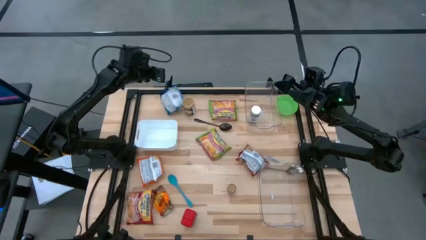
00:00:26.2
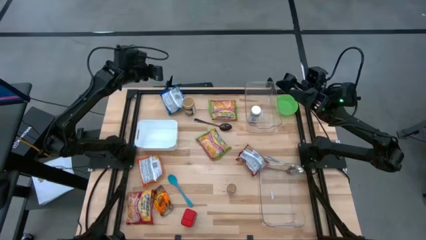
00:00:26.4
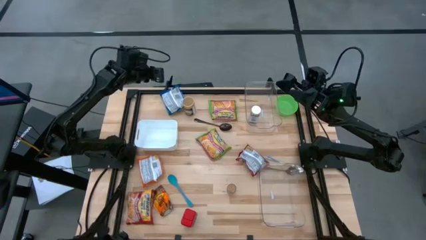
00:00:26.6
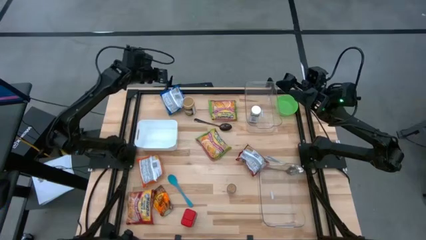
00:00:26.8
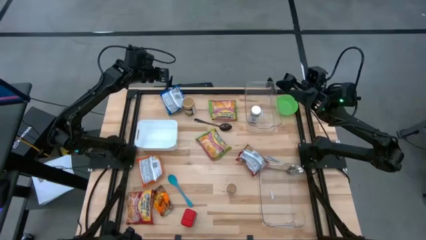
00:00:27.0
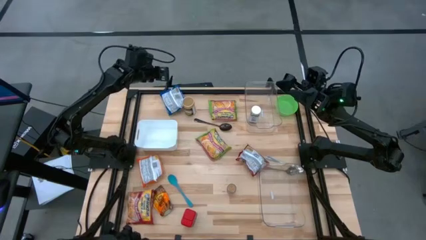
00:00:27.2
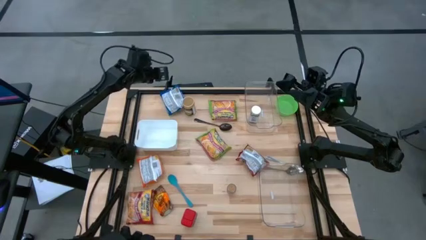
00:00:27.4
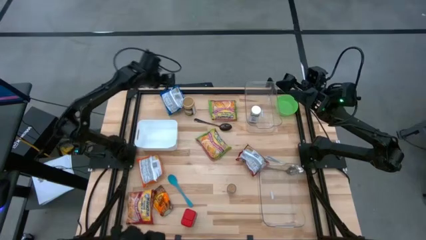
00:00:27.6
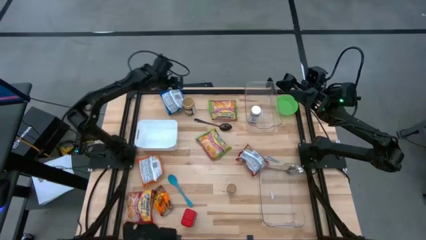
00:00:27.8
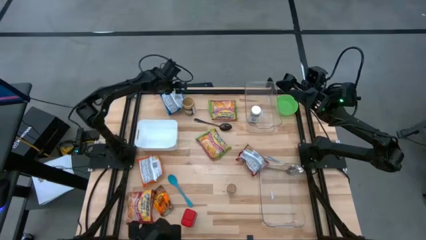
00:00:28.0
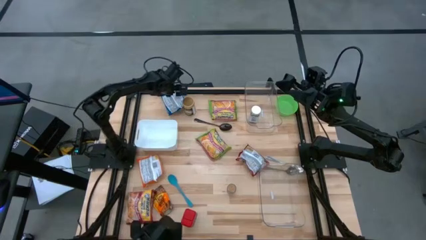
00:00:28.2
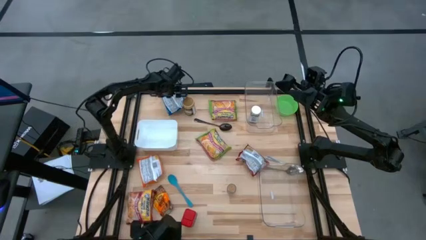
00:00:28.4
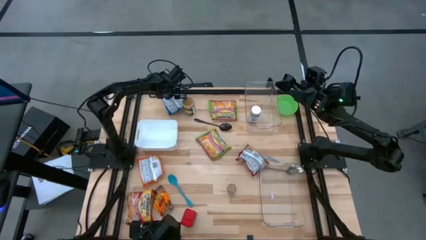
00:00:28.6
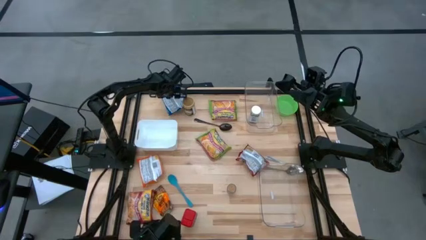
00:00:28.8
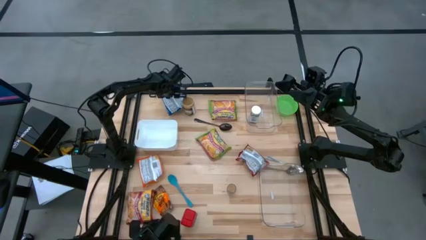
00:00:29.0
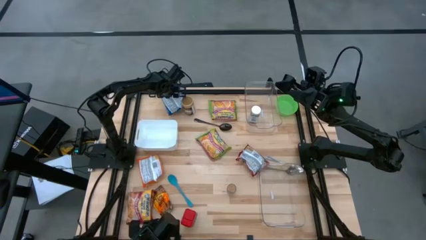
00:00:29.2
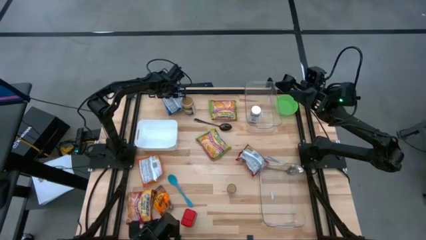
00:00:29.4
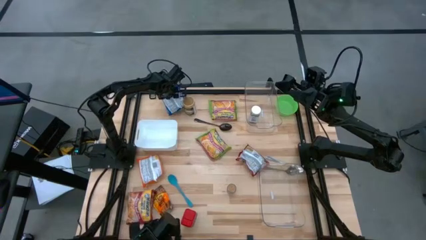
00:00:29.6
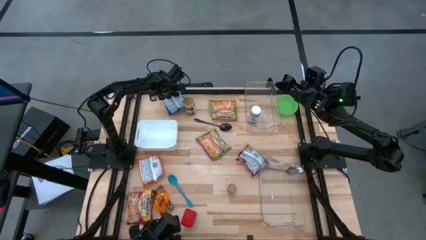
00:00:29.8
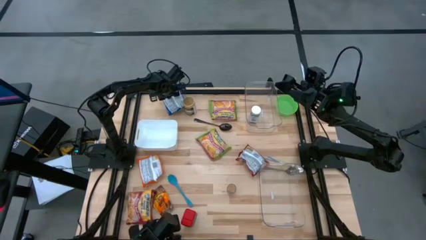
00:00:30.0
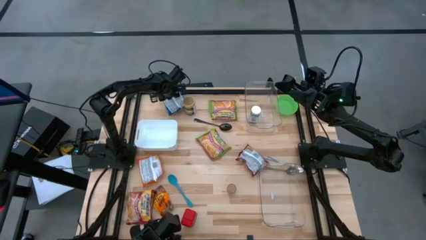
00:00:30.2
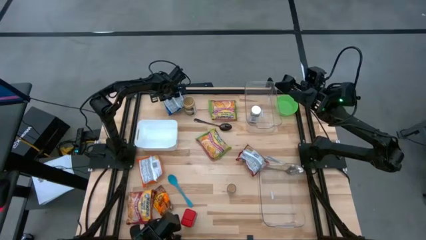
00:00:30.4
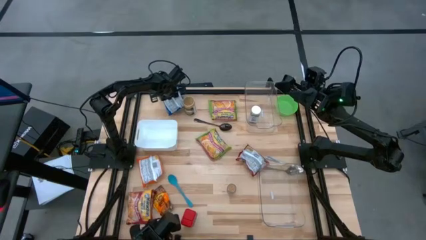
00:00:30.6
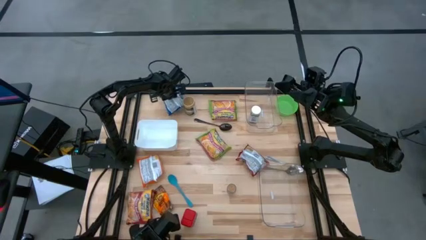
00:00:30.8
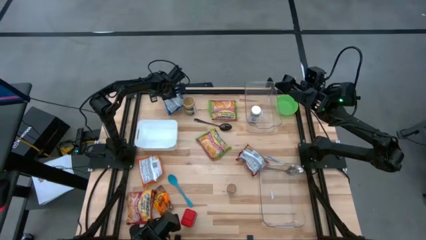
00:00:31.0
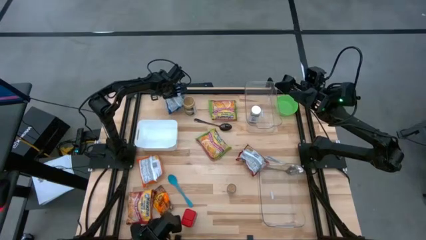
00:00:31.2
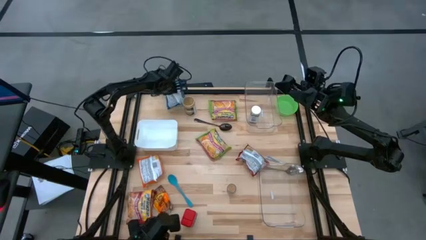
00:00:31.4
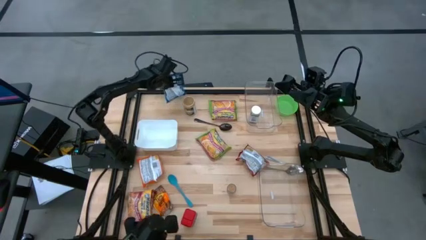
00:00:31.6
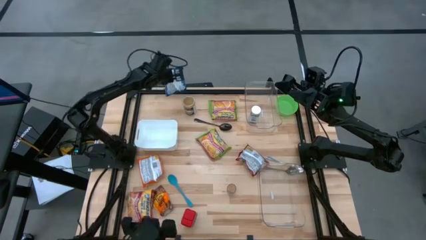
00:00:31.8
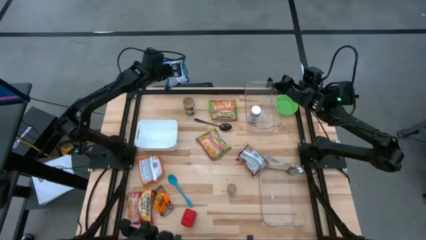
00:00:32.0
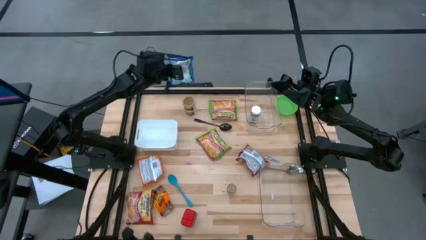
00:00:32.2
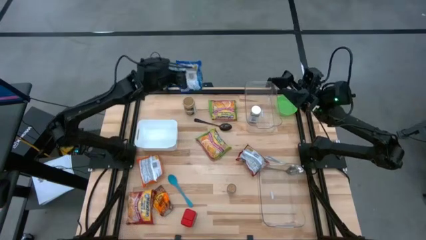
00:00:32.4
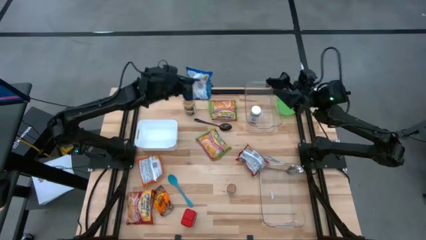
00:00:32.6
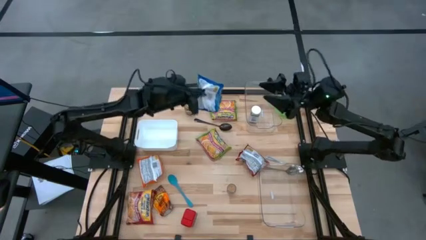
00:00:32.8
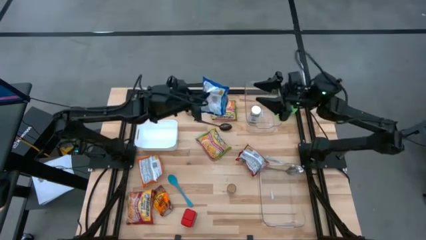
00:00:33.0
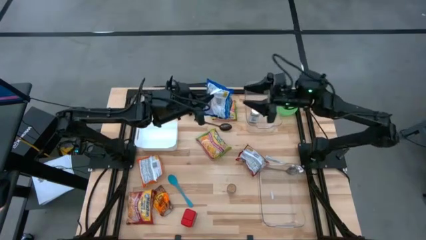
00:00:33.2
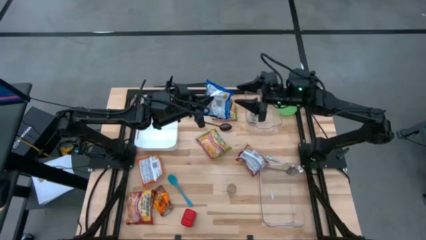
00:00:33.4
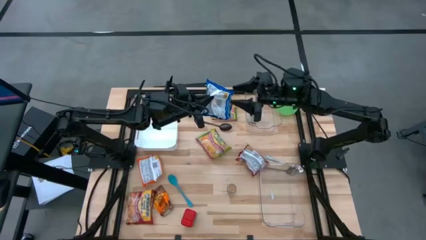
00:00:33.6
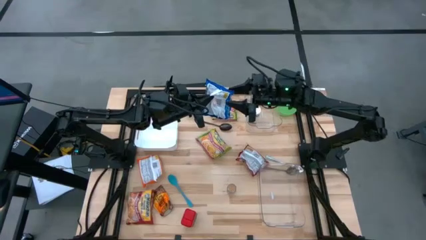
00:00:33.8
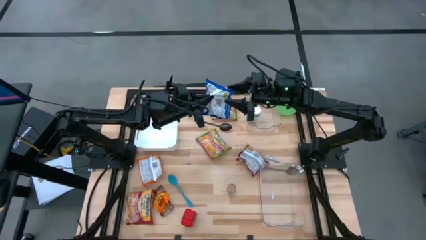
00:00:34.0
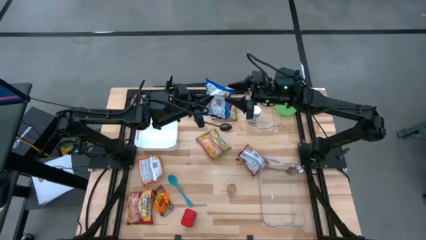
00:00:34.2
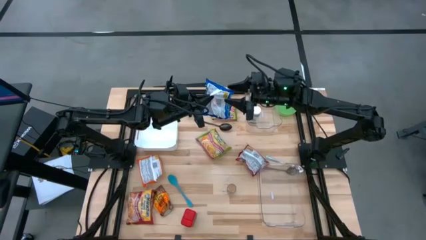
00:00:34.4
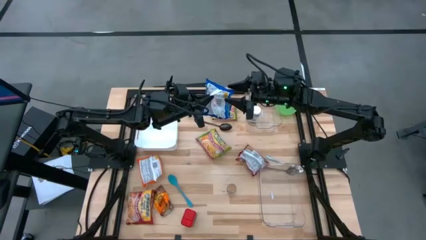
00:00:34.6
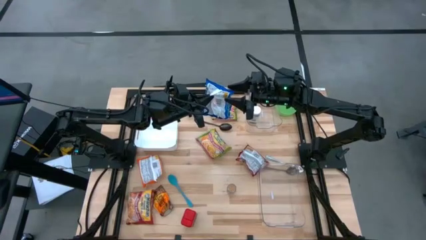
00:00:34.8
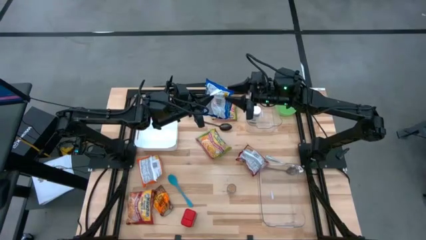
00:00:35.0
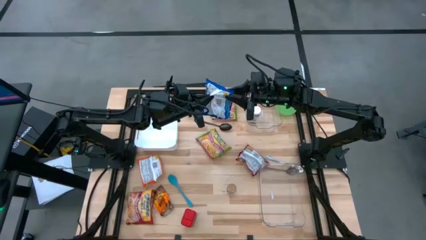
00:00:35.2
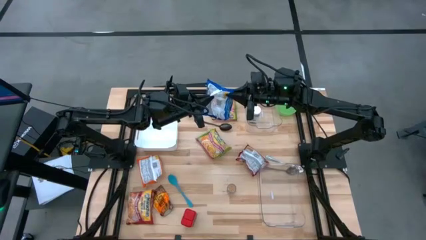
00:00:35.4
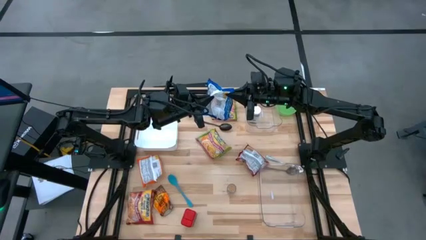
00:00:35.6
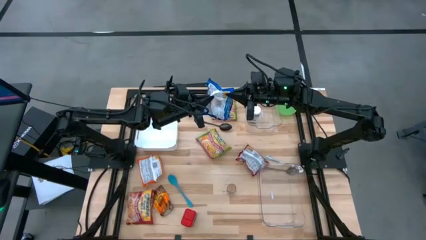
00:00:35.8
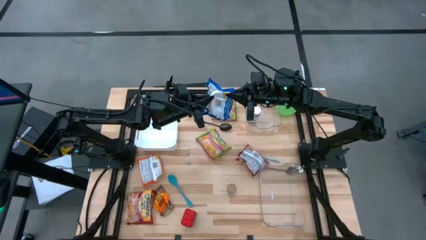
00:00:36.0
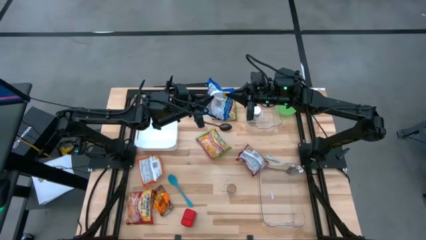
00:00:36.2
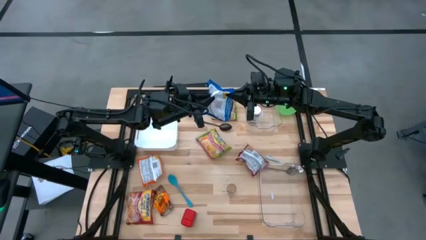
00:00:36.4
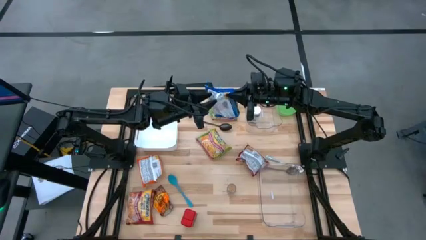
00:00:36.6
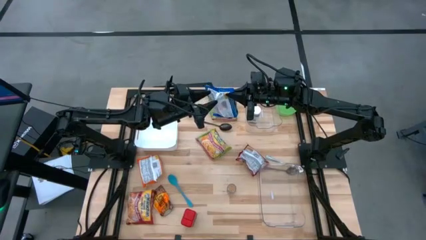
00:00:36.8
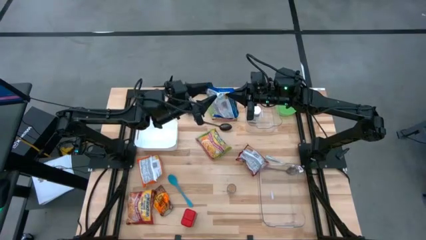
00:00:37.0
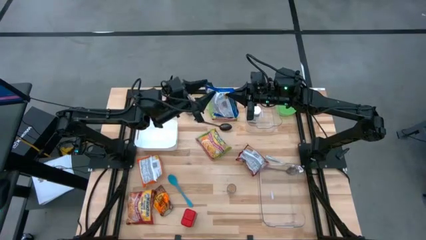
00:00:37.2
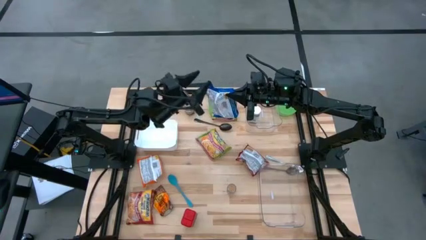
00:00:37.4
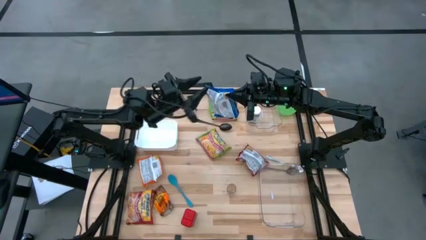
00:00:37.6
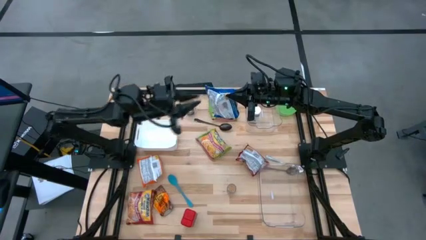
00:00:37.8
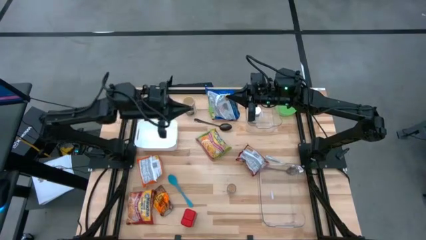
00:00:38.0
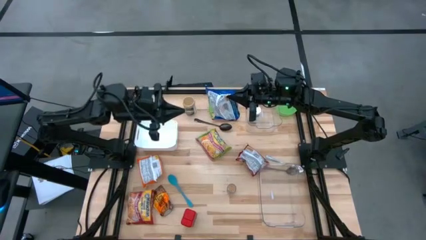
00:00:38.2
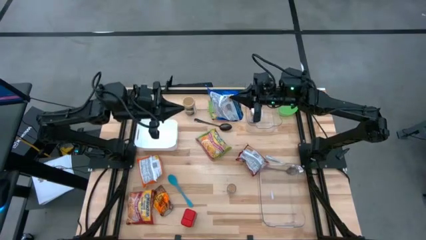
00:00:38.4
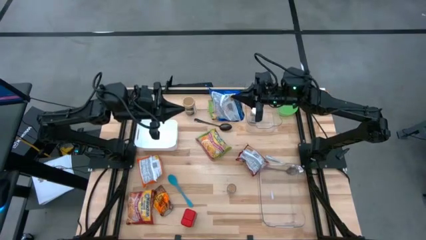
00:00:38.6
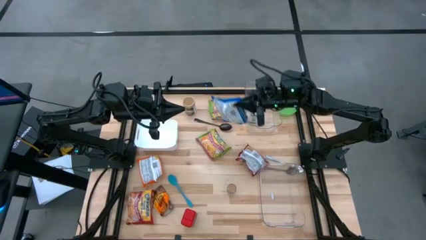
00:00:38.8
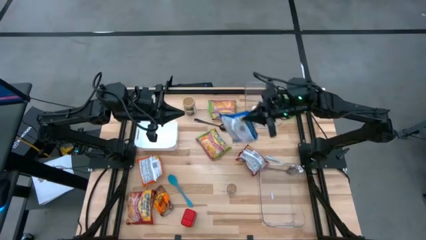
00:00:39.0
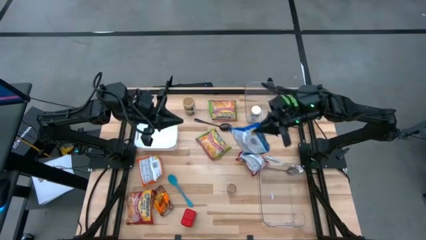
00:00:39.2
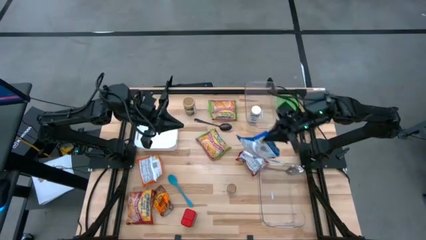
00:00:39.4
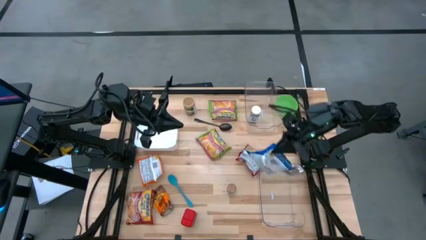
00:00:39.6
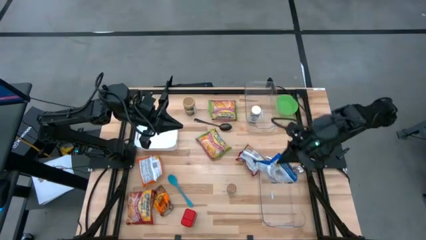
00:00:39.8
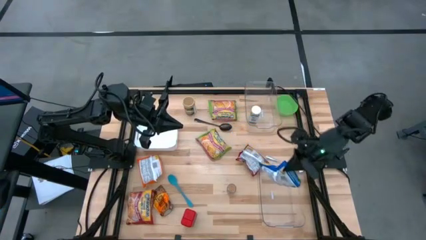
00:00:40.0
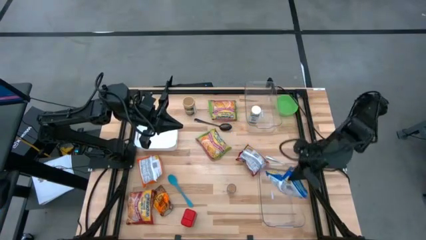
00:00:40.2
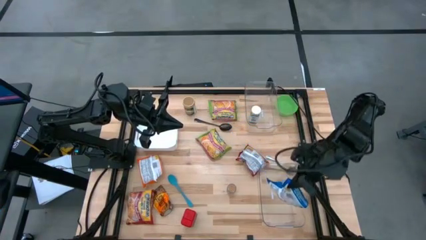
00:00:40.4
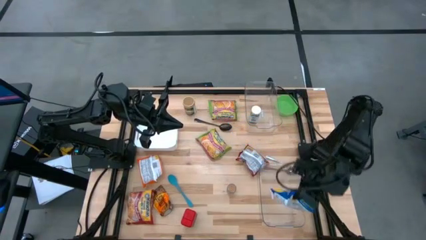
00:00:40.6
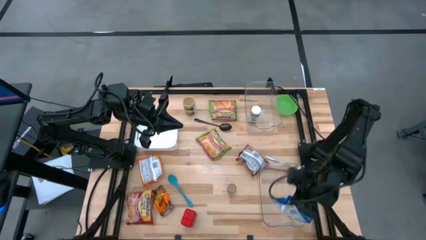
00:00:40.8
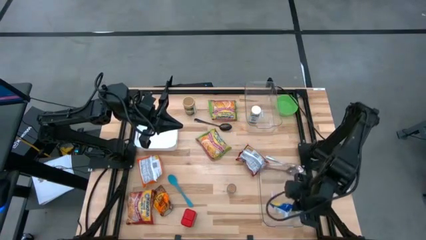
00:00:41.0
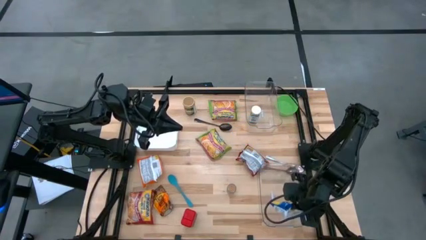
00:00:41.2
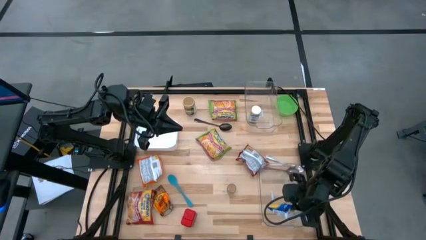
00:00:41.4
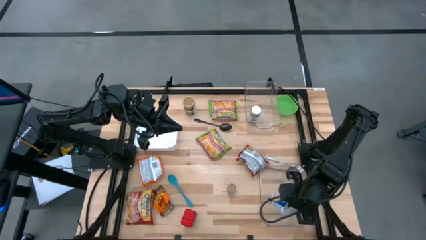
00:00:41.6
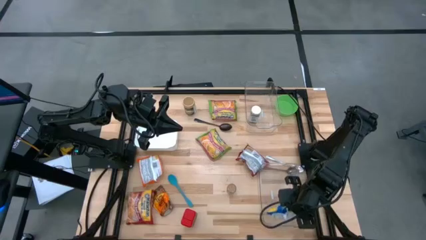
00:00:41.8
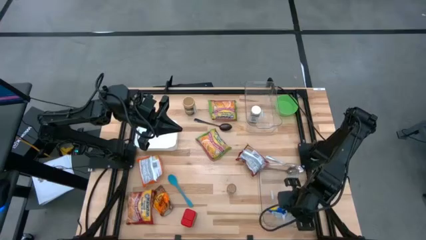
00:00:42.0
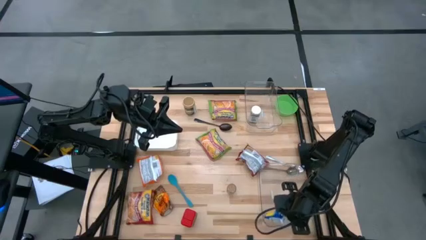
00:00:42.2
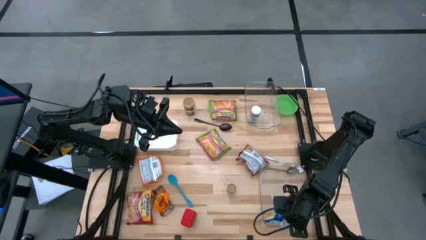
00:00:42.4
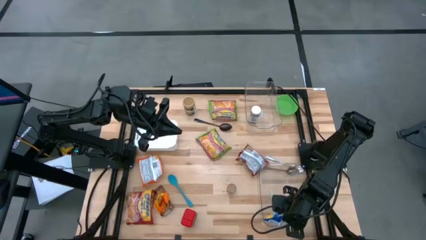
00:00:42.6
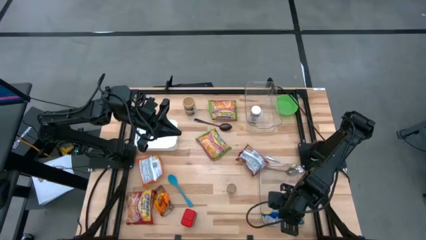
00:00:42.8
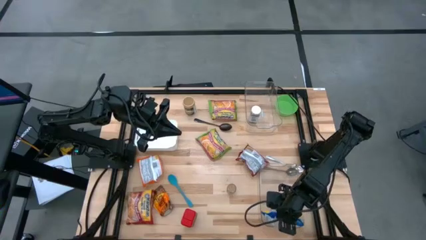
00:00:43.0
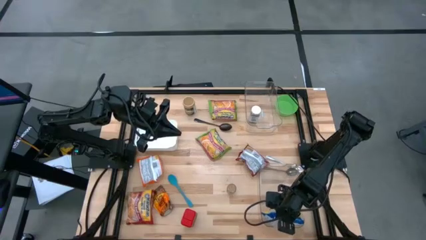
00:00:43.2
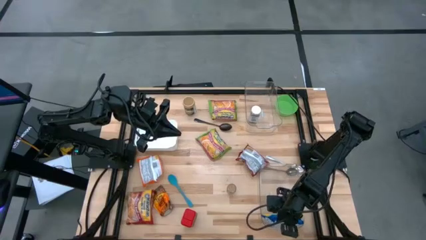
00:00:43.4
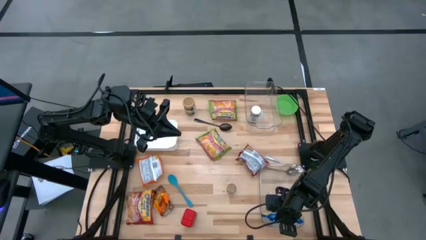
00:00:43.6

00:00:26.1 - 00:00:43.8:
Task: Pick & Place Food Item
Put the blue noodle pack into the bottom transparent bin
